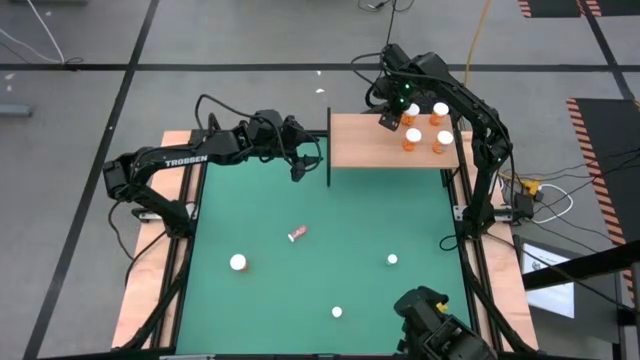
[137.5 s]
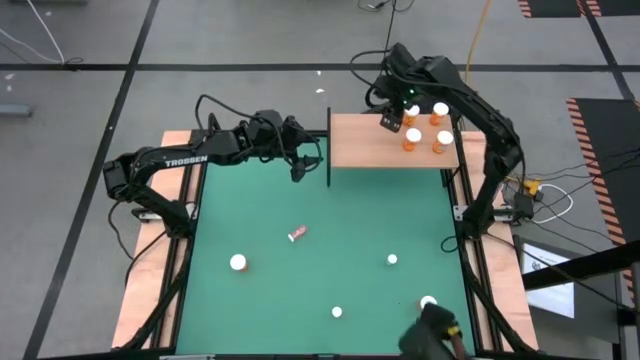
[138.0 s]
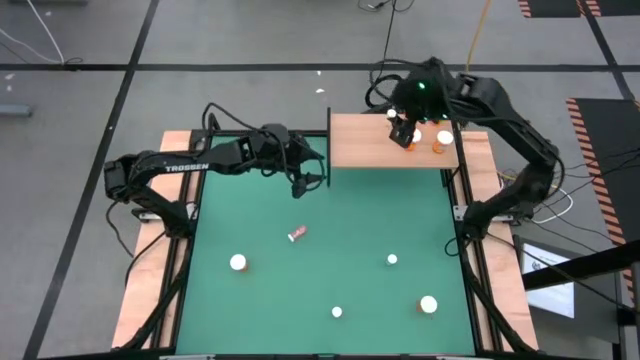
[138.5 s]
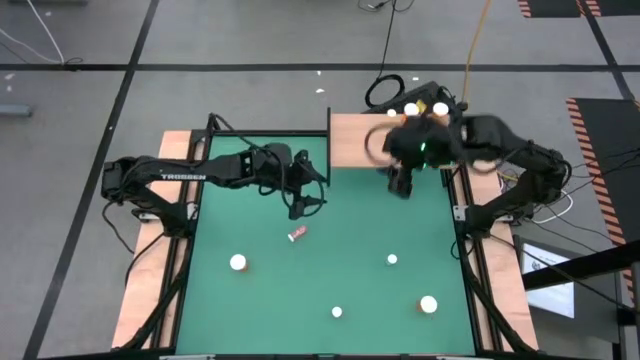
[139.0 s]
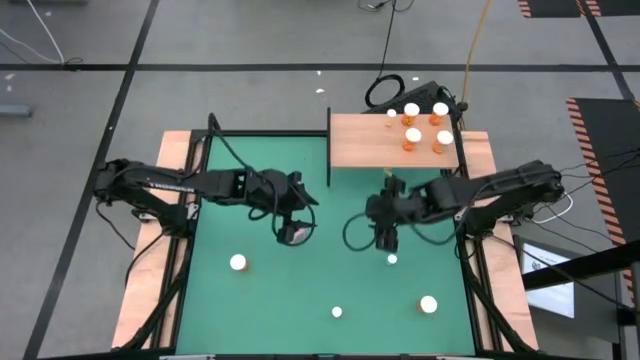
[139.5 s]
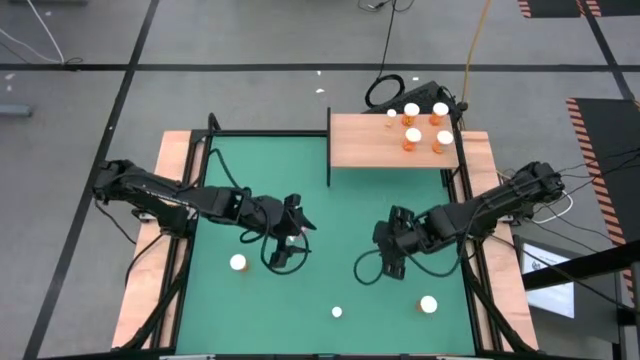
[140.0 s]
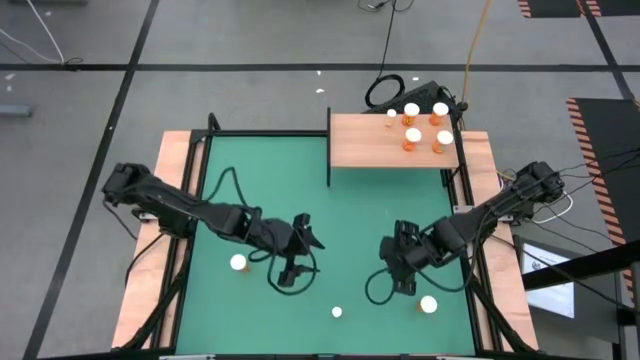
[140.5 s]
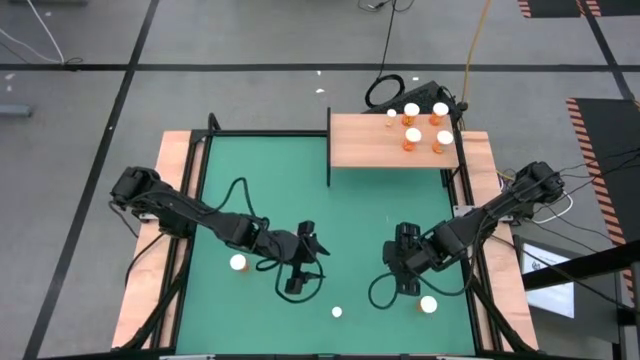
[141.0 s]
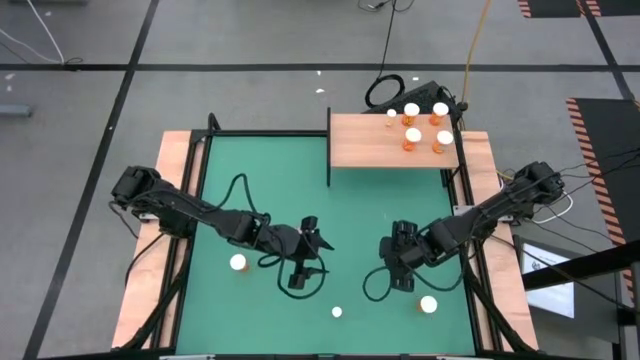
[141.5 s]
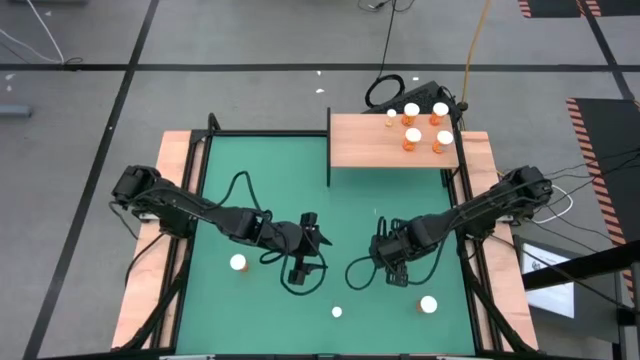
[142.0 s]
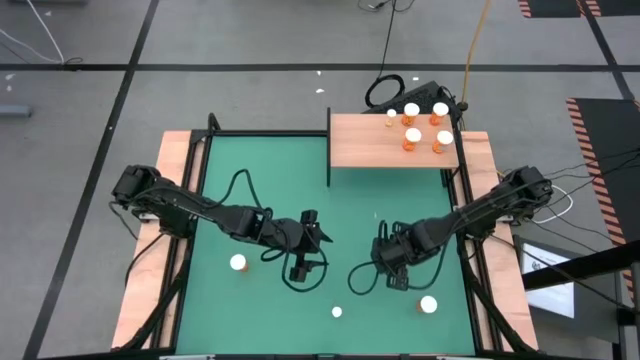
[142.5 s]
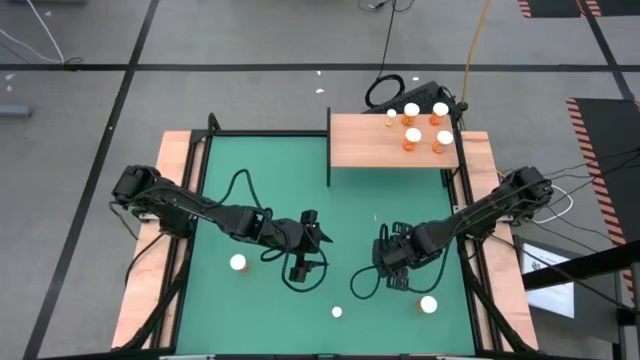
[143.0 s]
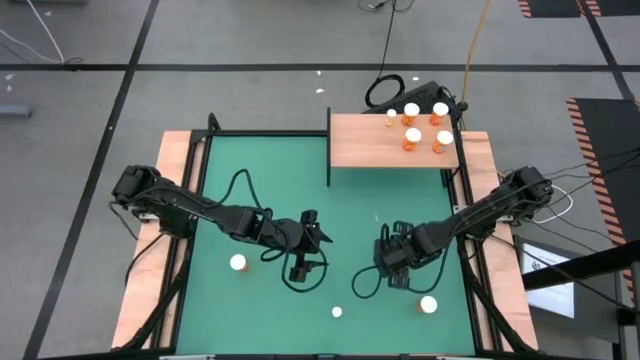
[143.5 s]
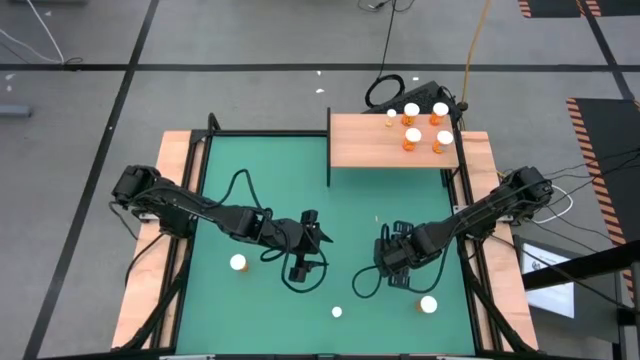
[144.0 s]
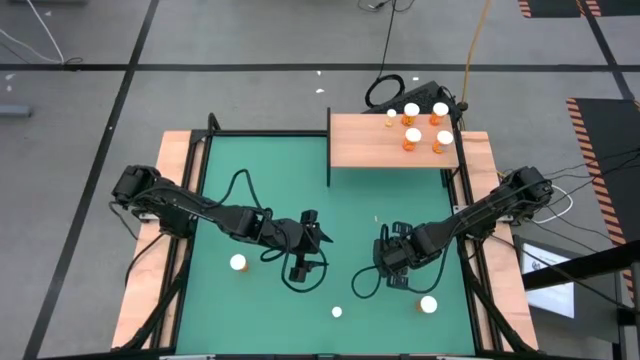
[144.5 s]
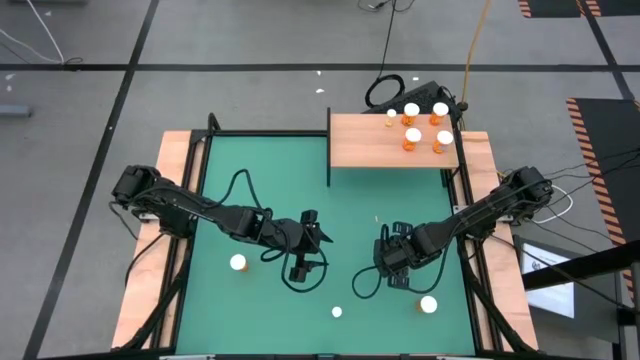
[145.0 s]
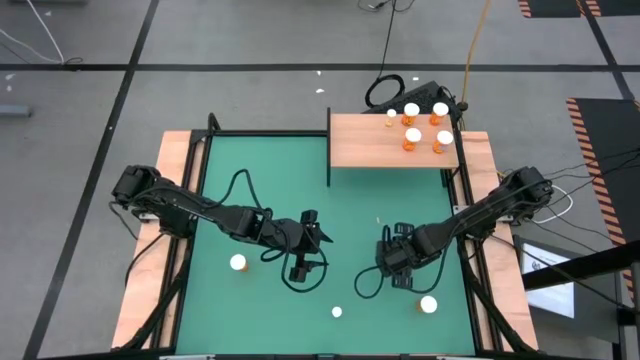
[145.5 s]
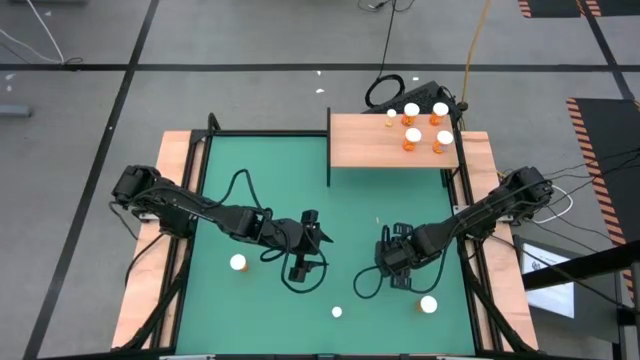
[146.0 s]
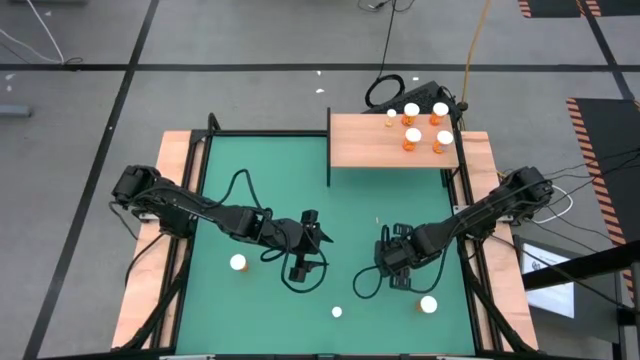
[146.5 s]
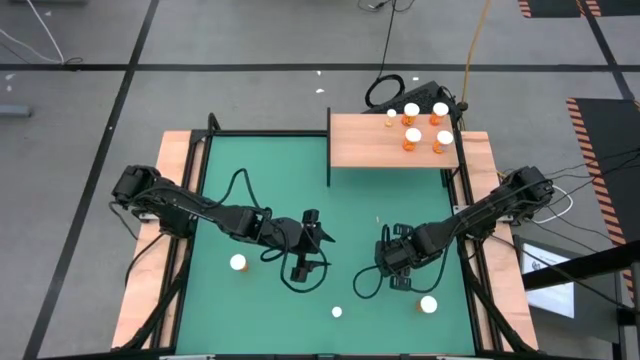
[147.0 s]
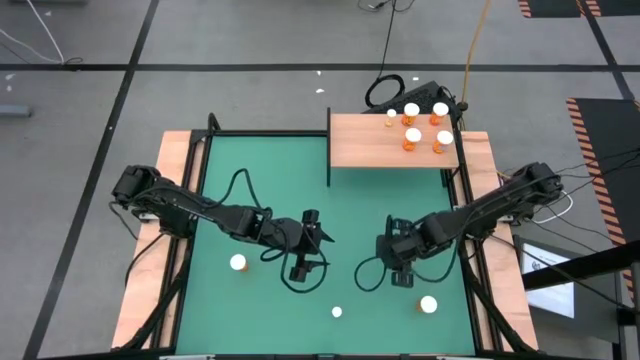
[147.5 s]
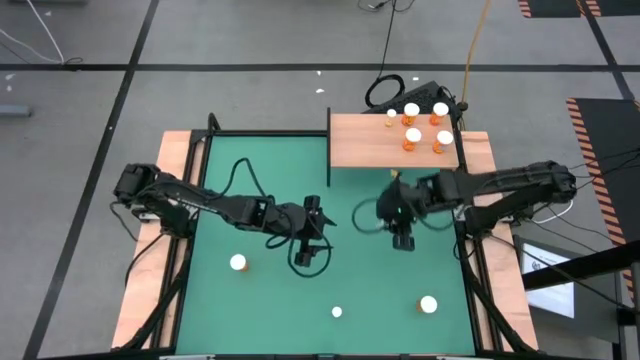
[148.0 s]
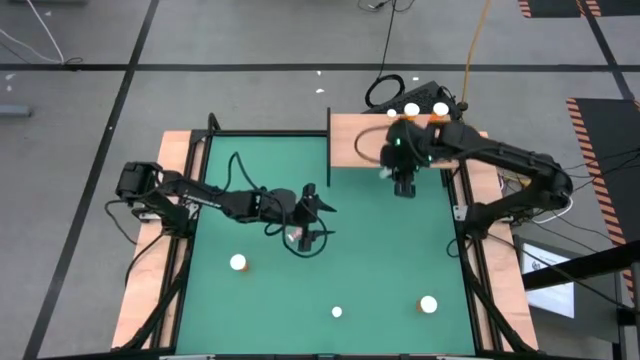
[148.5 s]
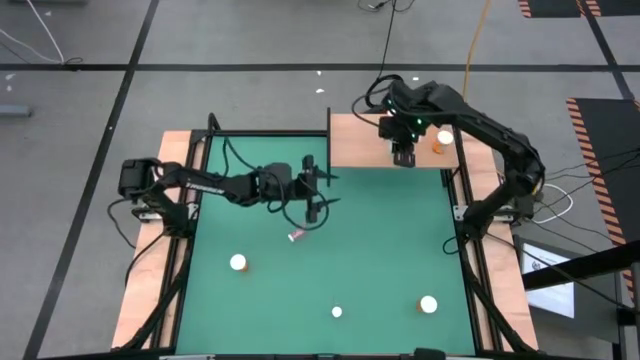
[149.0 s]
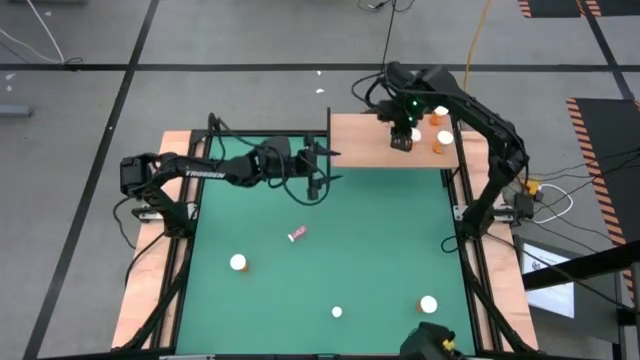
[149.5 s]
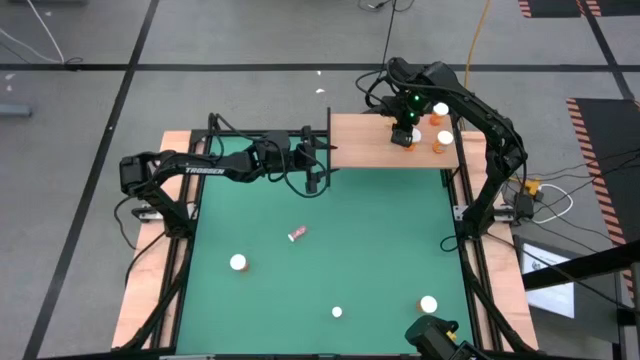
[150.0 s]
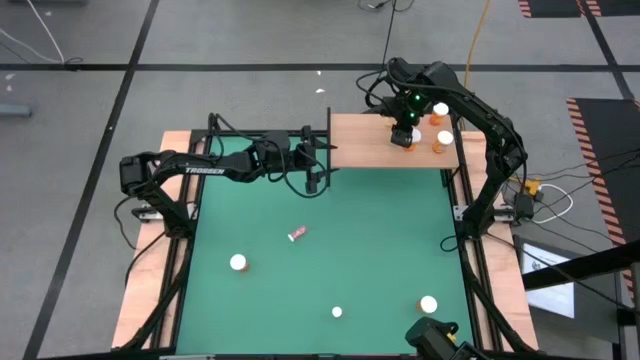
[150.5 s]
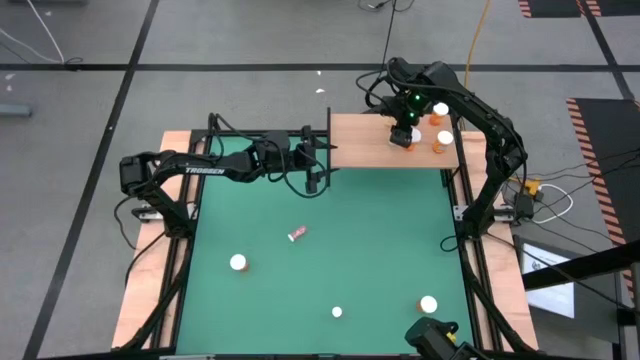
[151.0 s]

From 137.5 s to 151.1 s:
Task: Pick and place medicine bottles onto shelf by color
Put the blue pill bottle on the shelf

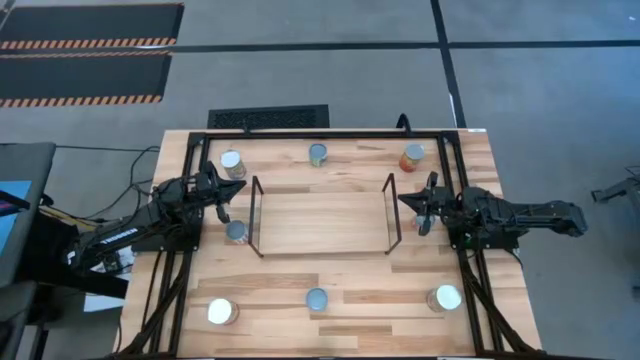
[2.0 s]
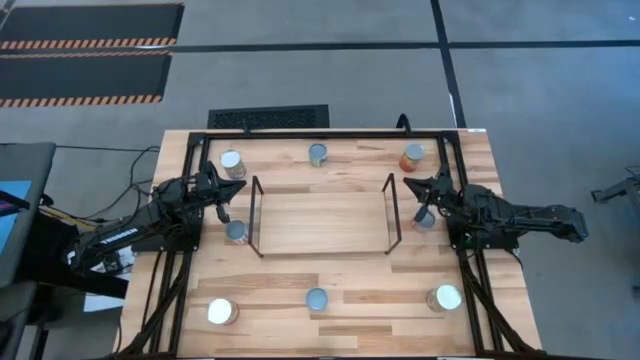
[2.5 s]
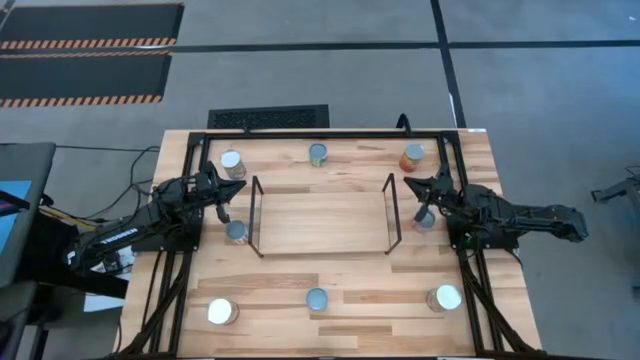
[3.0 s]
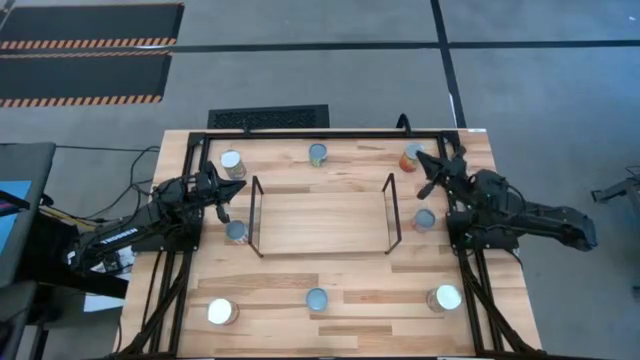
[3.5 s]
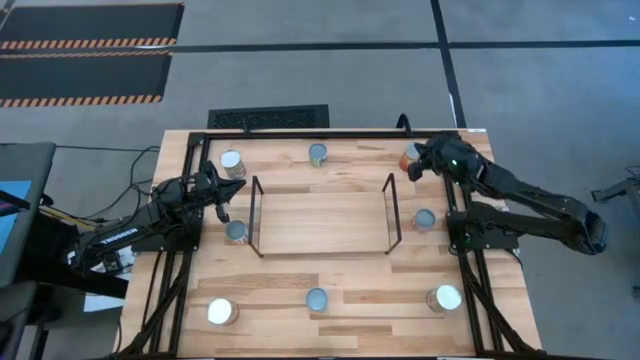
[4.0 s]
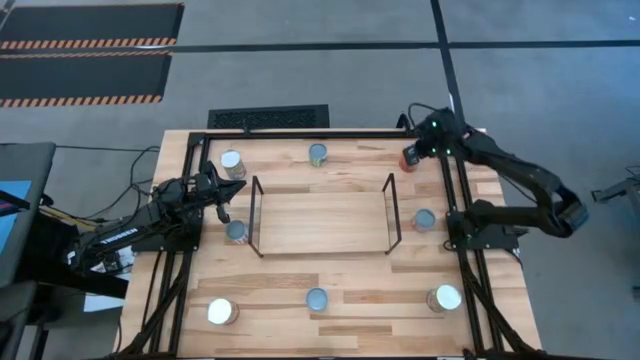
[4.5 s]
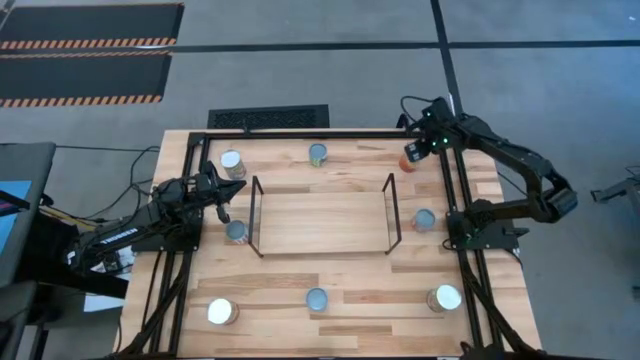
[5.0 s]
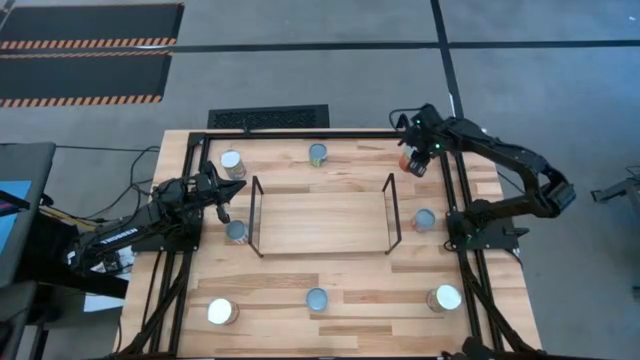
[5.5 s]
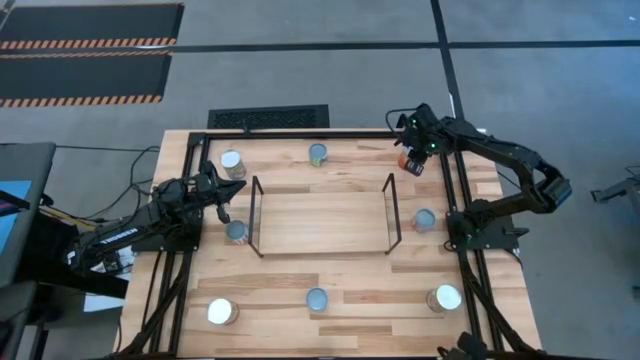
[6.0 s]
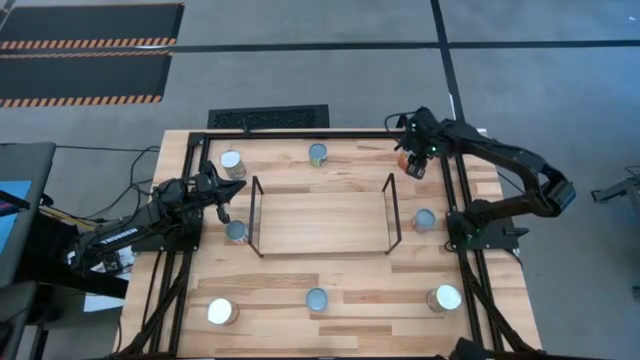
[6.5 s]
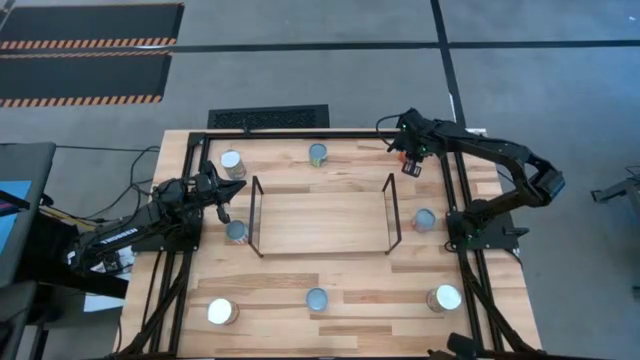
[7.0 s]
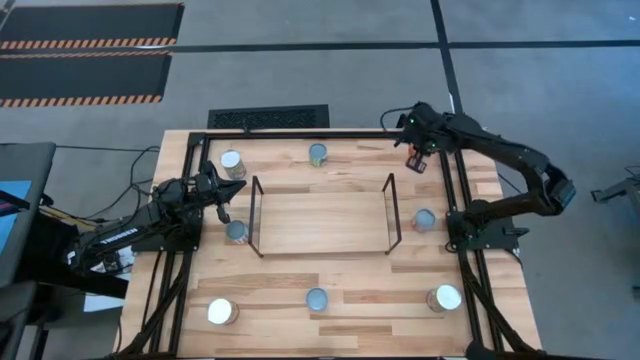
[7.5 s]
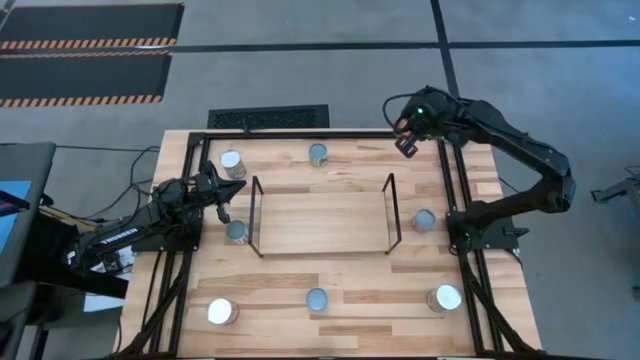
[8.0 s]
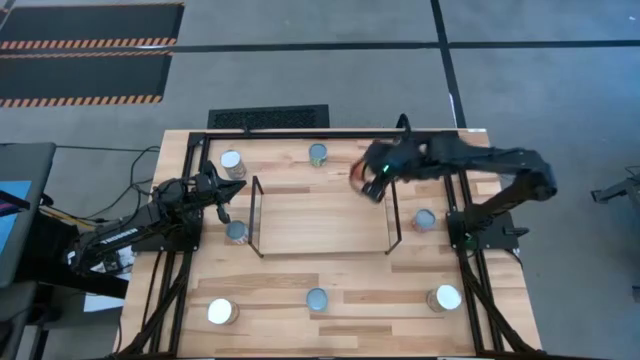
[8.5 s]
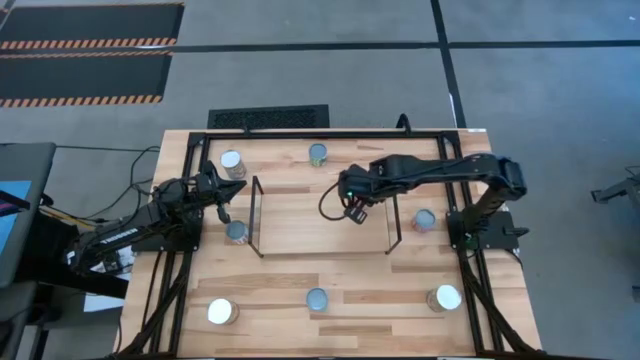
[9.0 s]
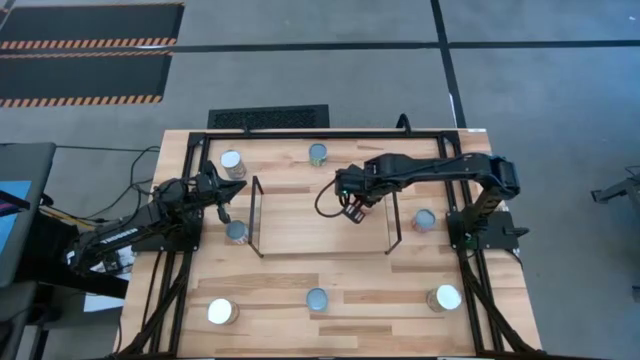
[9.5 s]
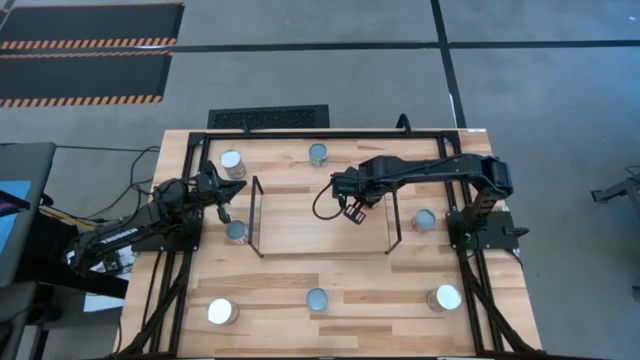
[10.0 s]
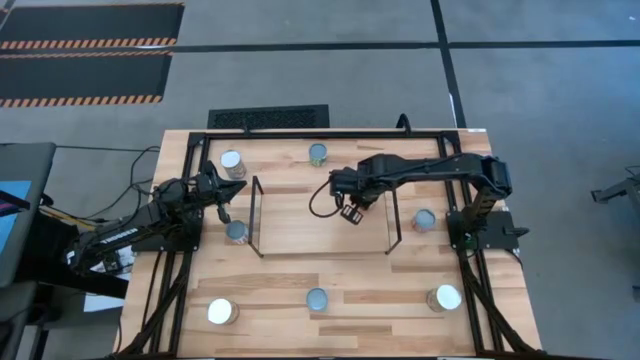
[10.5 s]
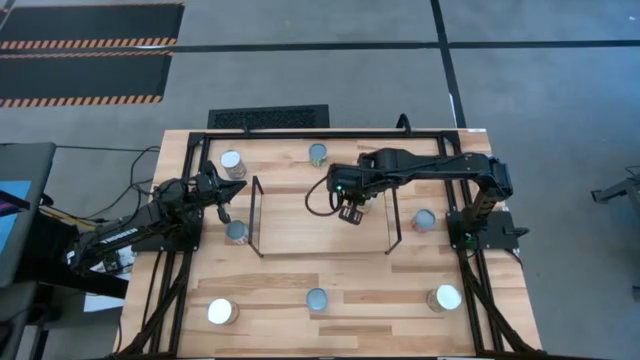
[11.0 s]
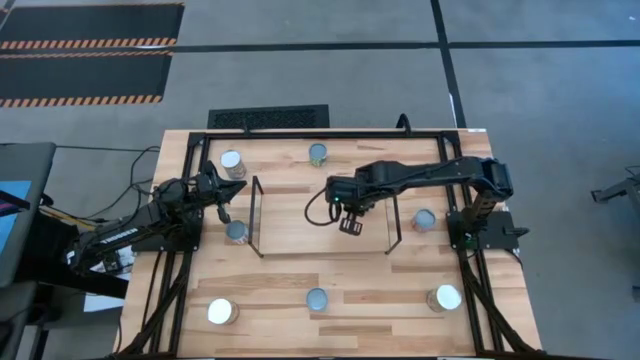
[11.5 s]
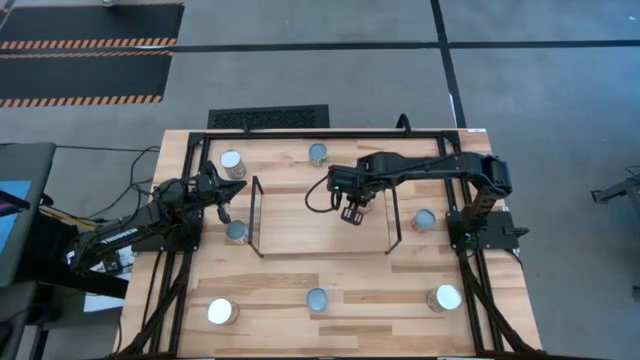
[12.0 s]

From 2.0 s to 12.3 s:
Task: Pick and place cans onto a shelf
Put the top large canned corn on the shelf
